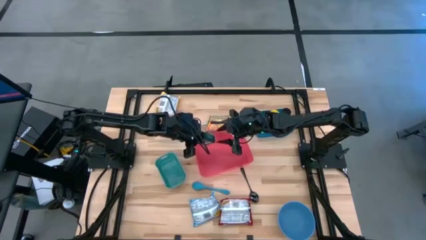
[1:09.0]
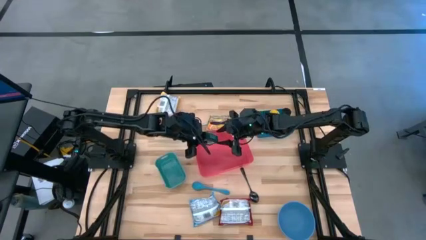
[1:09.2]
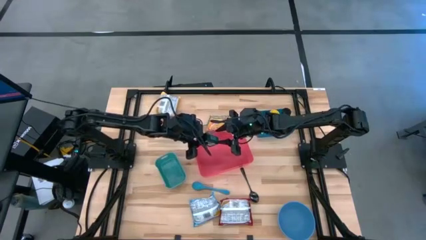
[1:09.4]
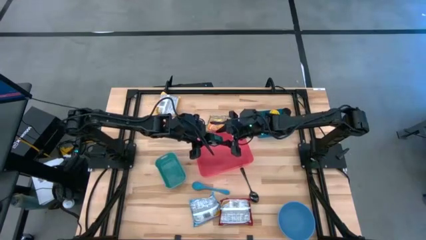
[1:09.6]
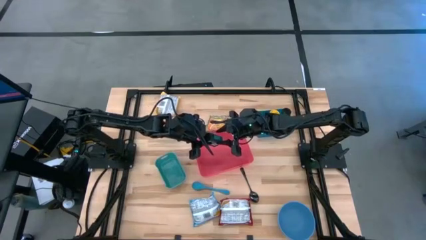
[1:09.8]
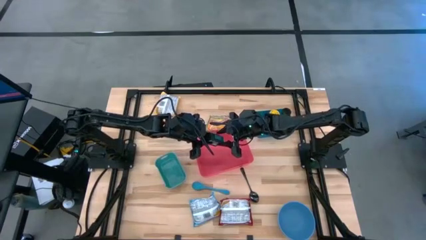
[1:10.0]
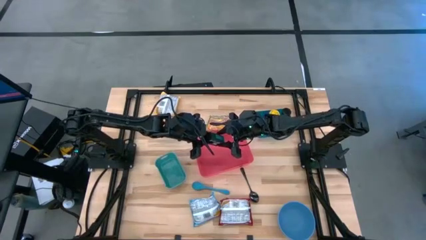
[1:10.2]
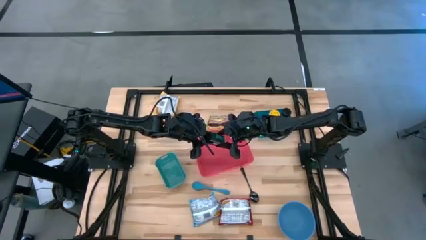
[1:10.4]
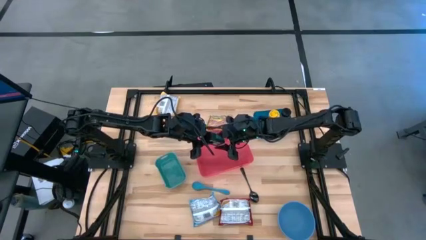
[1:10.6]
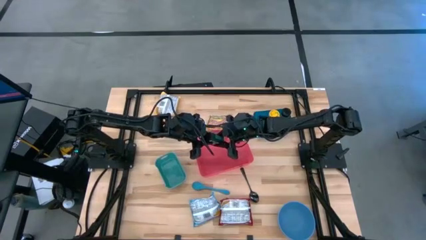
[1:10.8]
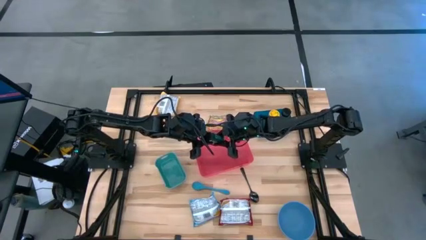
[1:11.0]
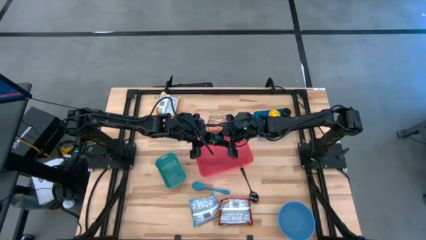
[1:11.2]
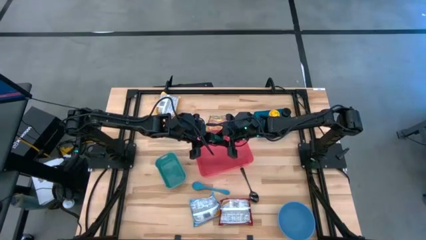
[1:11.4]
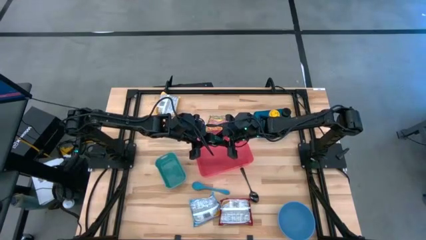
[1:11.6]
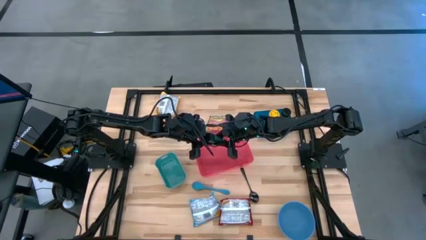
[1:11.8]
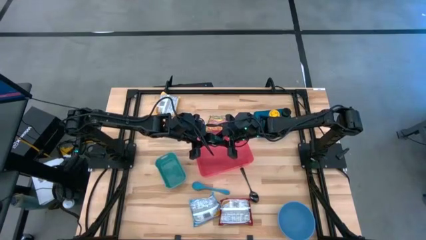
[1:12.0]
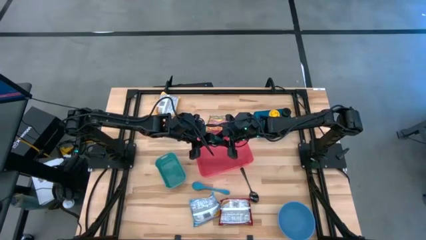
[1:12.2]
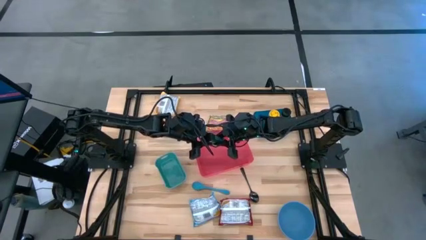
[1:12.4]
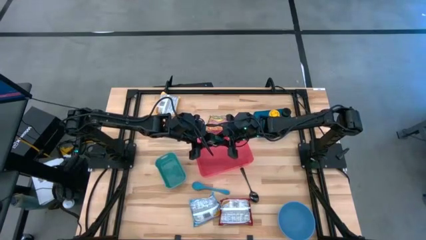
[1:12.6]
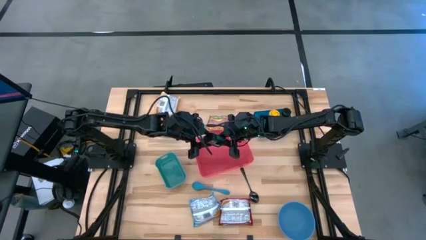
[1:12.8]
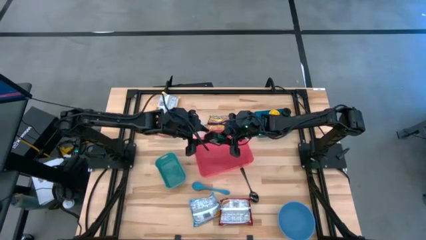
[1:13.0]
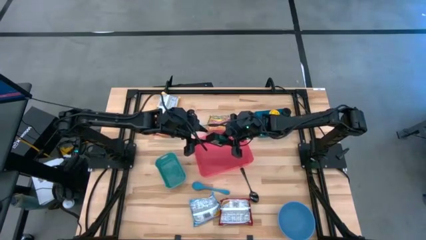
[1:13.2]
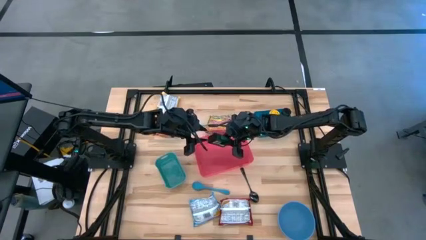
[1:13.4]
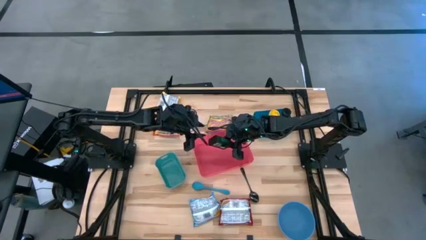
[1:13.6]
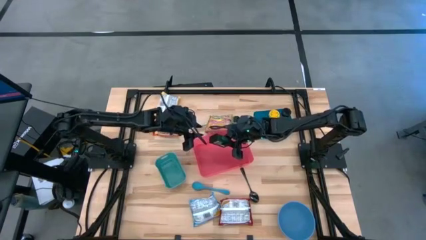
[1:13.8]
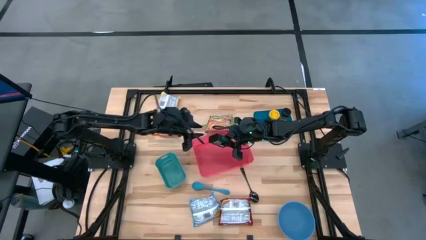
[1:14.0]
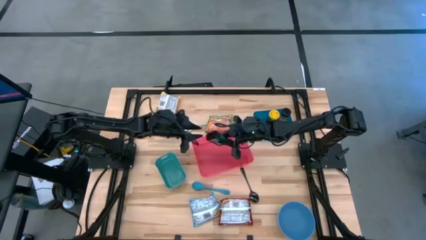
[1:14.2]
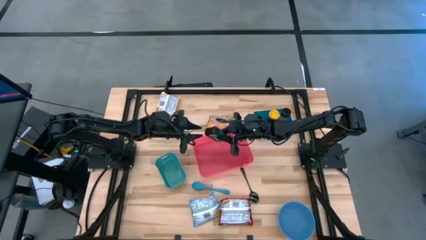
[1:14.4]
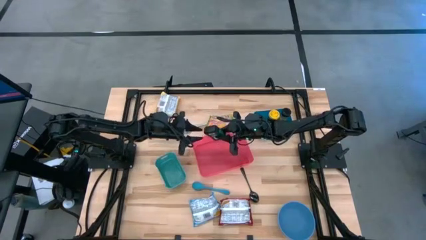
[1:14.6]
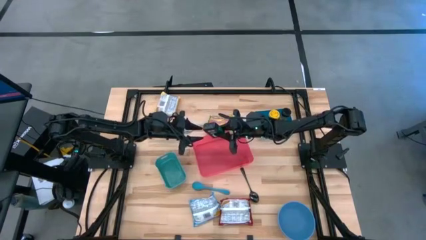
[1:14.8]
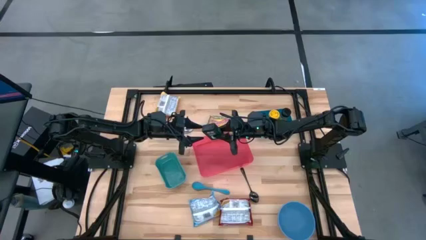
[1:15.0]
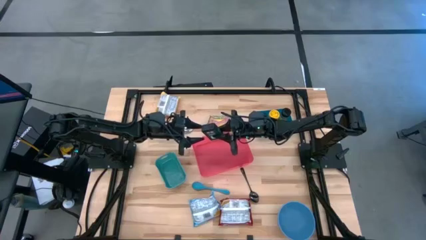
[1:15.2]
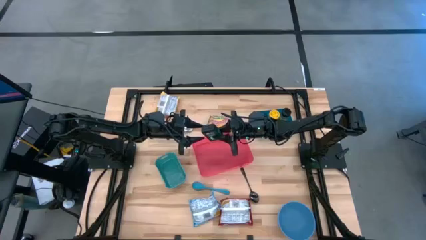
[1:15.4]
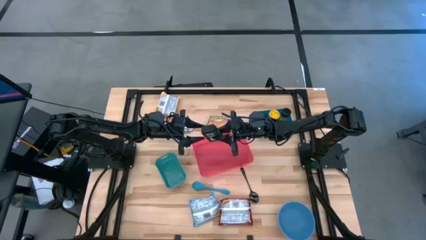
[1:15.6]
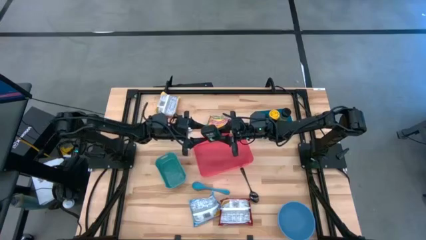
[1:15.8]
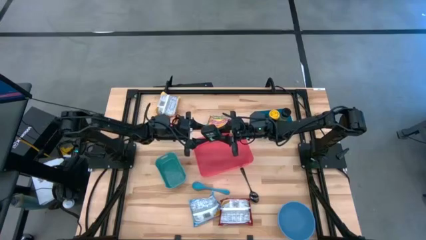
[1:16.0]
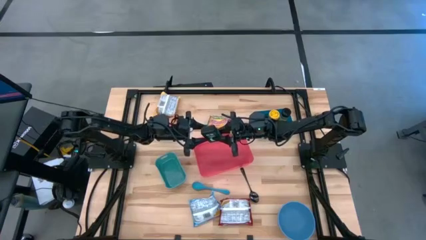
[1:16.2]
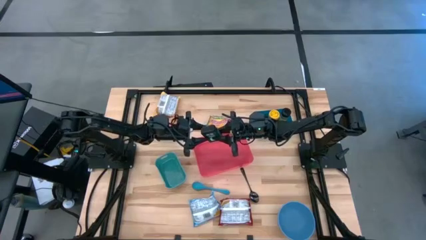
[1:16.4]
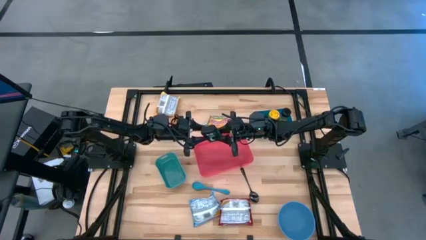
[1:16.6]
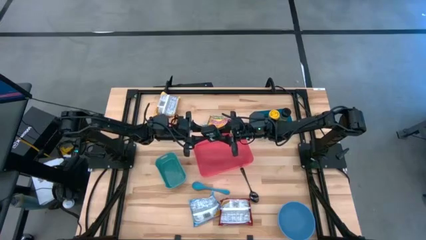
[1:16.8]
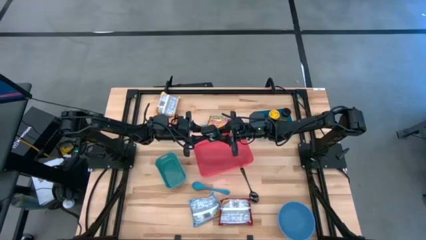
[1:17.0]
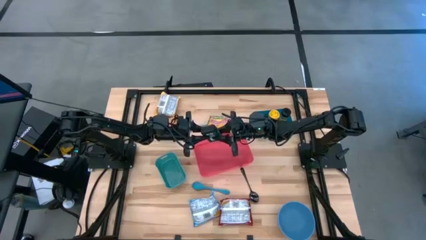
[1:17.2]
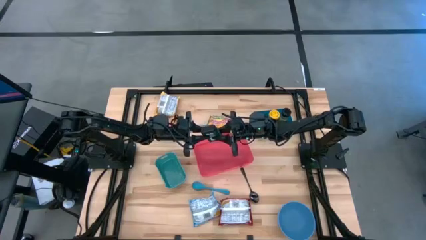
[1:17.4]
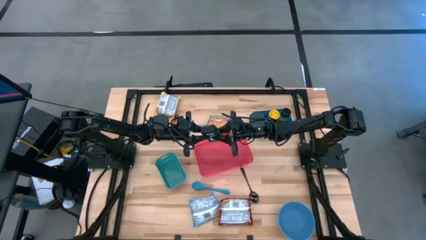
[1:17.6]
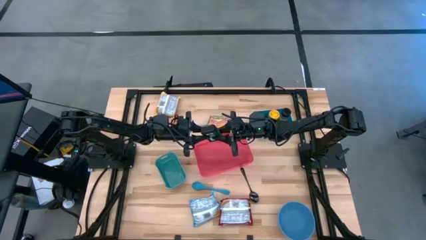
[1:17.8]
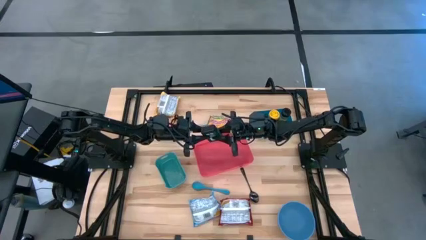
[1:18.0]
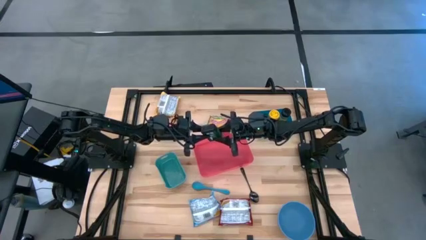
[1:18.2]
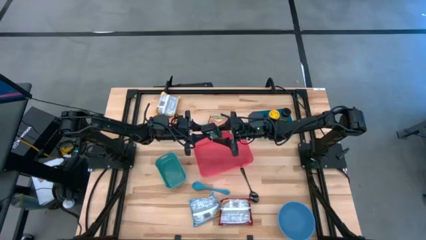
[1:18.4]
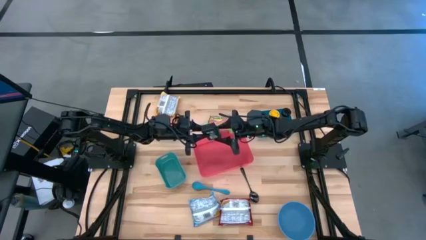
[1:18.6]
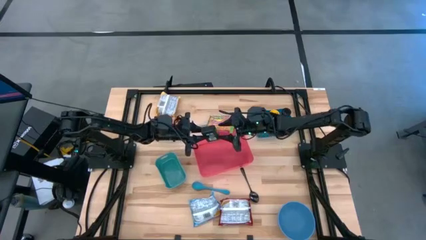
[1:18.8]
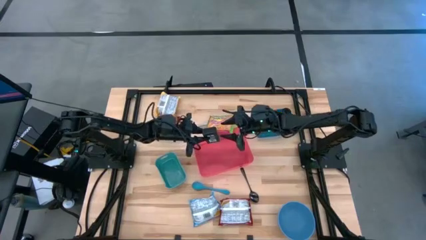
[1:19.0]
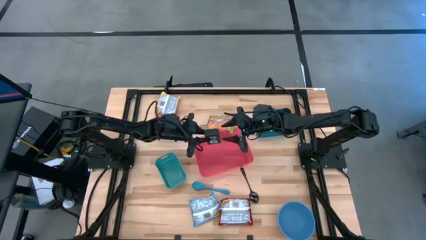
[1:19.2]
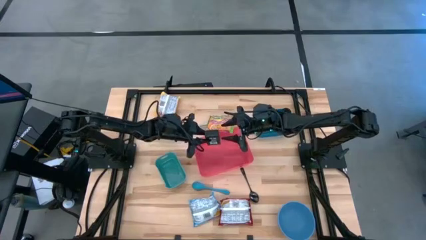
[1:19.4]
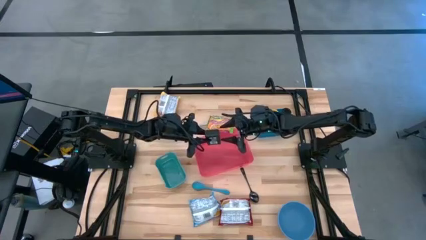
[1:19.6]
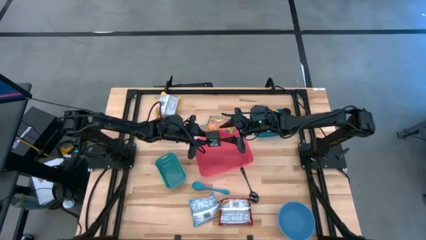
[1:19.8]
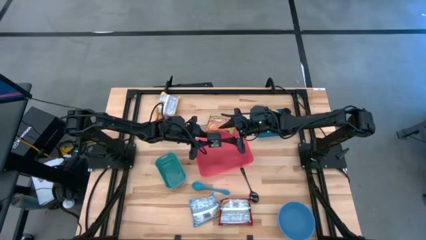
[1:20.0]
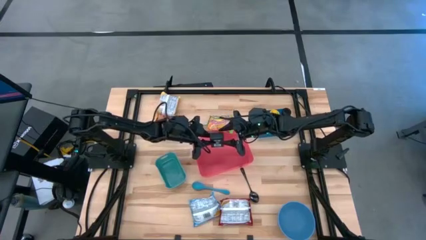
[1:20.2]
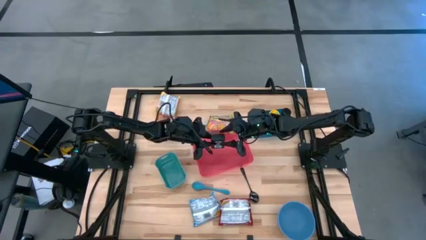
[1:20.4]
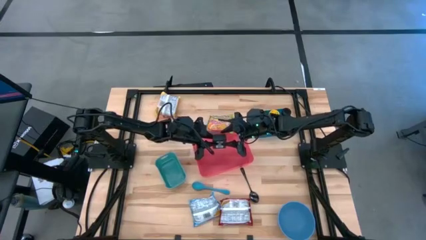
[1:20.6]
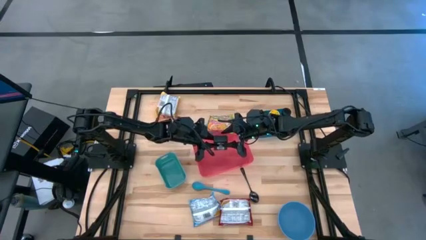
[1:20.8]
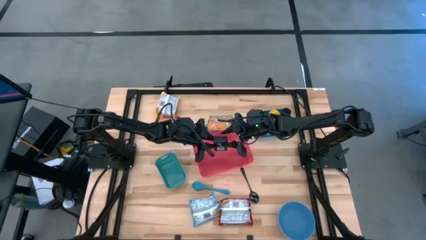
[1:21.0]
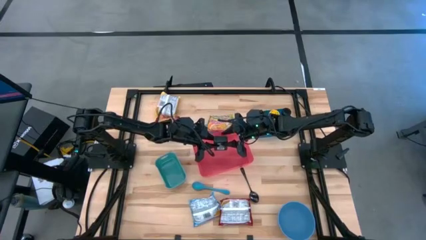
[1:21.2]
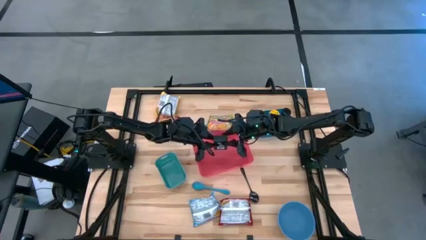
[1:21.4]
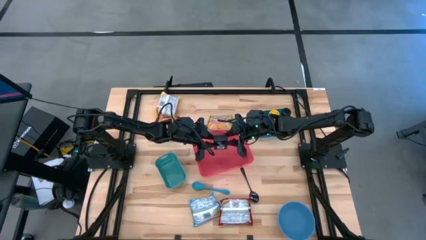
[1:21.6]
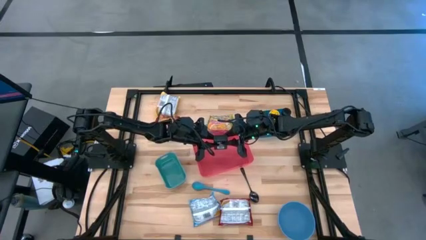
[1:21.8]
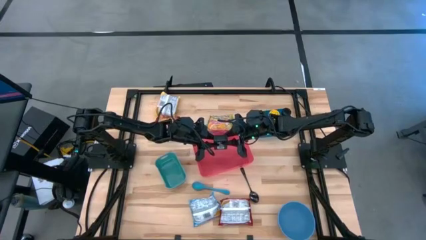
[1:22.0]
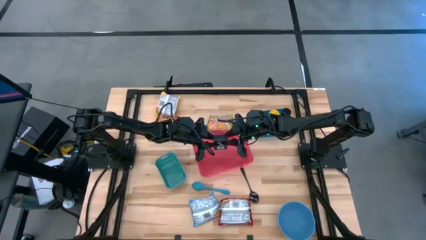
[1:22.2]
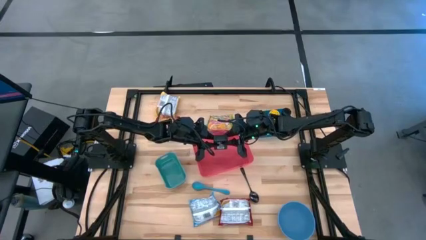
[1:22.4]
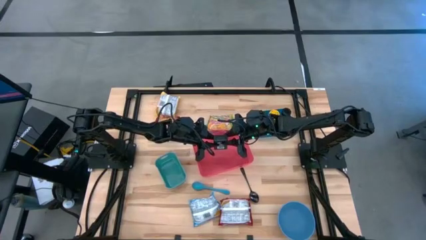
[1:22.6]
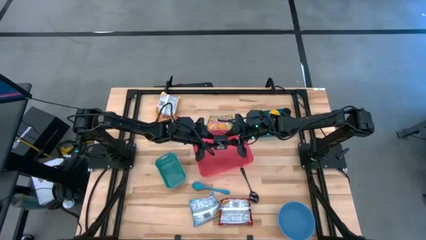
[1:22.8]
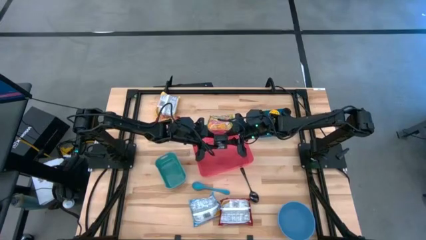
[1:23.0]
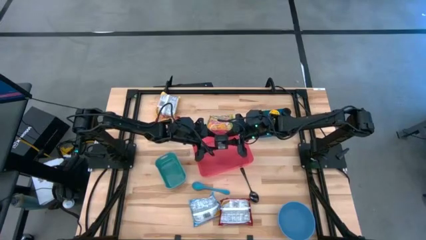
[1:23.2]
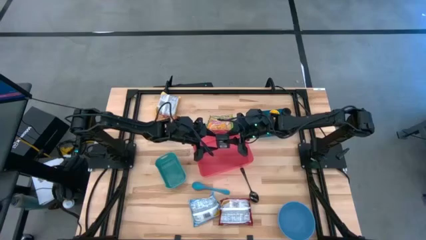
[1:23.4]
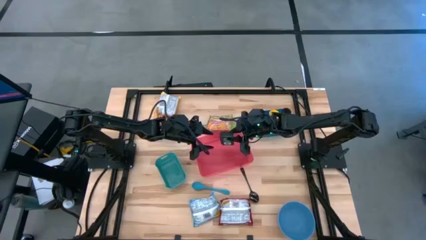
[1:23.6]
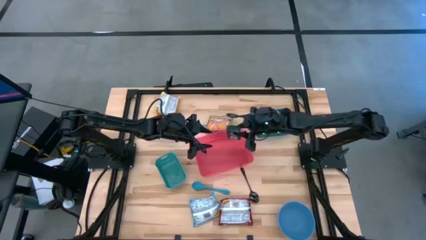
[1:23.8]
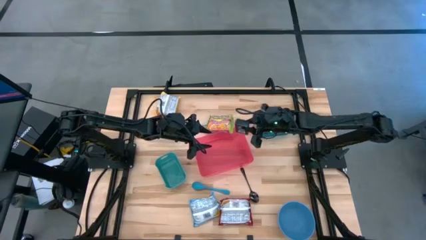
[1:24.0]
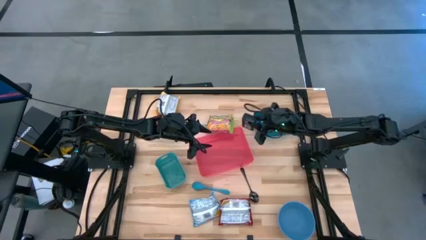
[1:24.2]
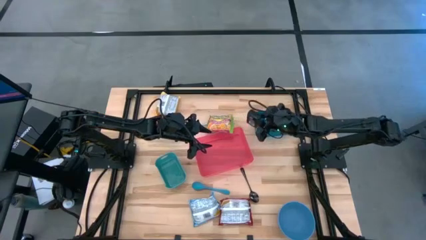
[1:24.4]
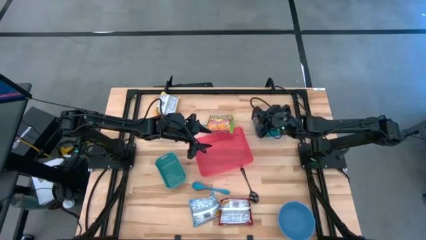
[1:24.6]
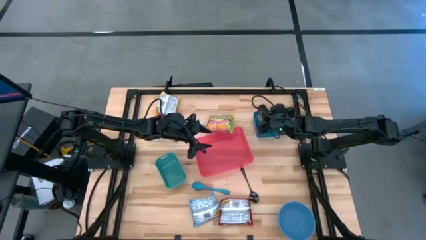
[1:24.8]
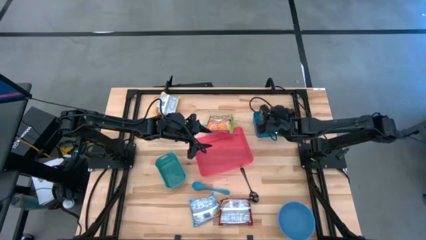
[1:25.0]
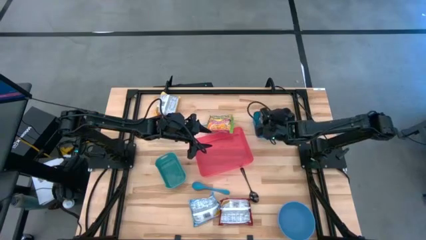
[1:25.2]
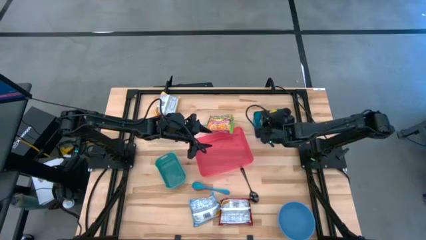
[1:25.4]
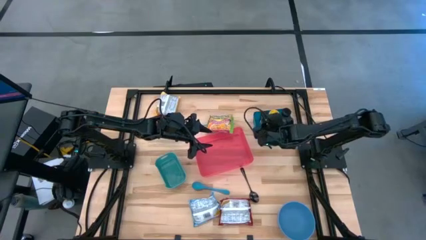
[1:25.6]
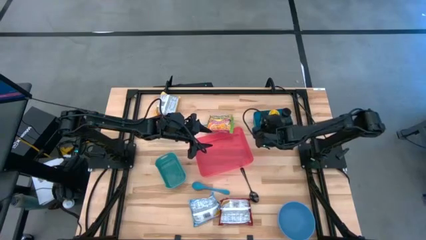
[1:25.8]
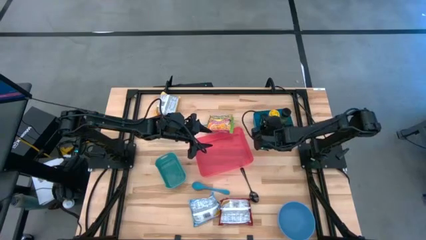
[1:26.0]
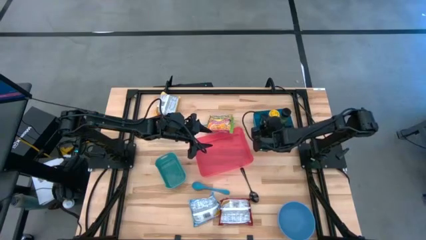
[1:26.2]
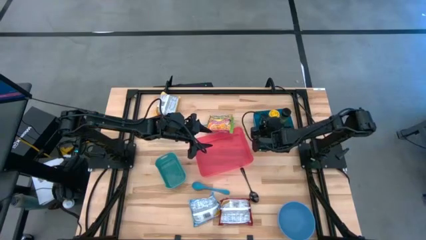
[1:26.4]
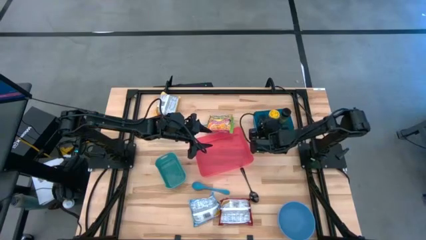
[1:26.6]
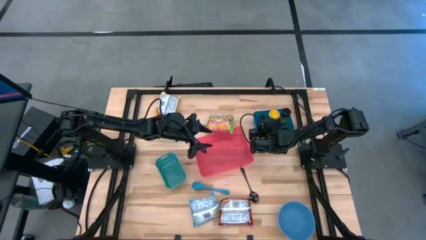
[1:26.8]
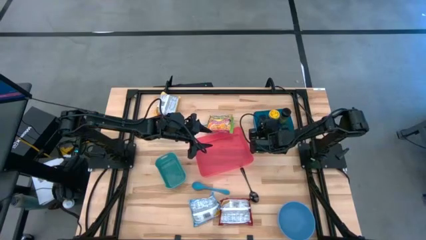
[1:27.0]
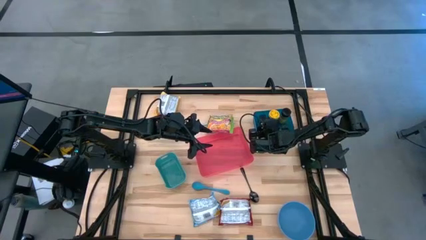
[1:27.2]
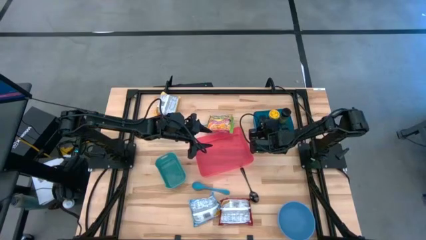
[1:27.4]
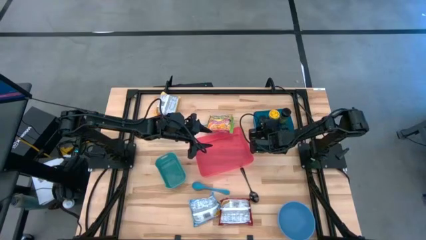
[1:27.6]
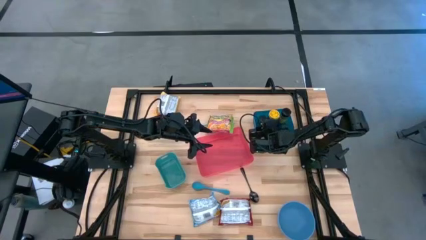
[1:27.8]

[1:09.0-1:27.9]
Task: Pick & Place Food Item
Put the green seasoning can into the blue bin
